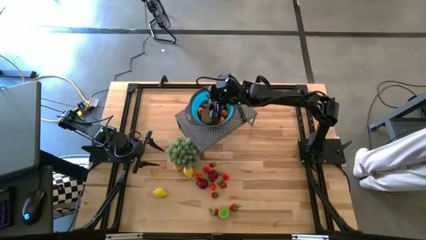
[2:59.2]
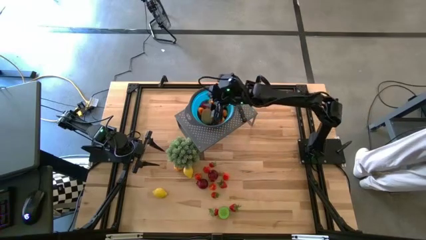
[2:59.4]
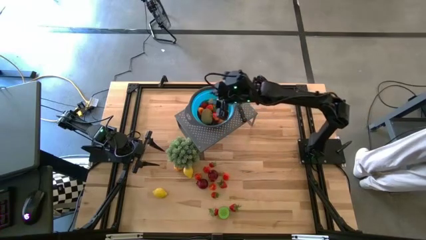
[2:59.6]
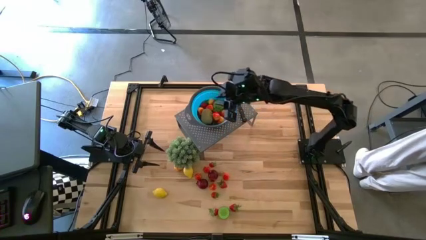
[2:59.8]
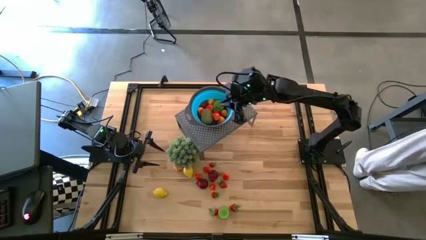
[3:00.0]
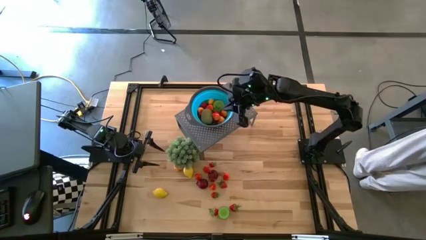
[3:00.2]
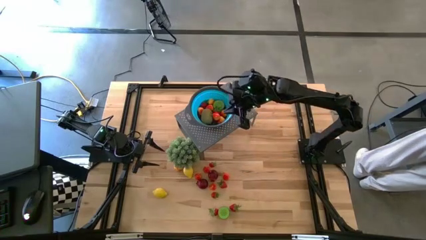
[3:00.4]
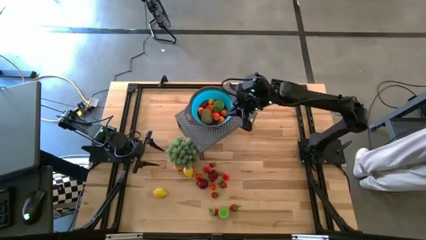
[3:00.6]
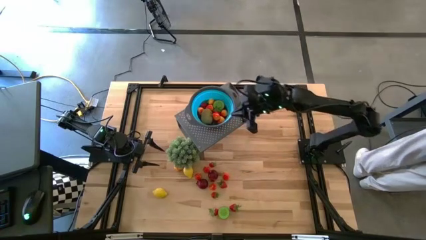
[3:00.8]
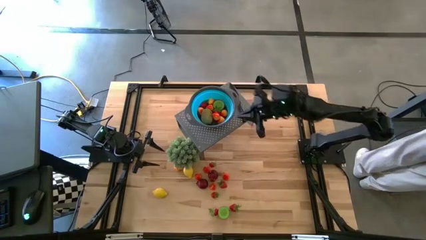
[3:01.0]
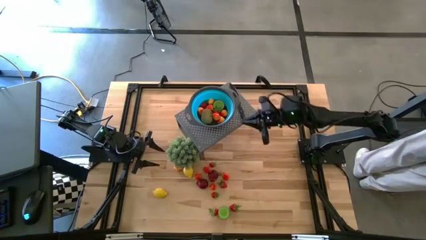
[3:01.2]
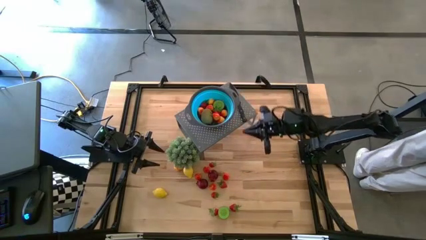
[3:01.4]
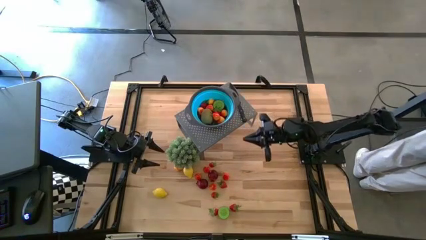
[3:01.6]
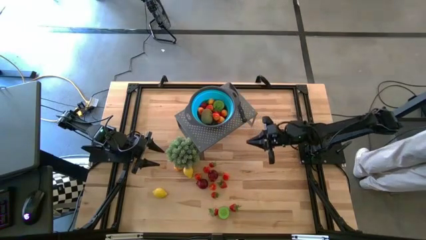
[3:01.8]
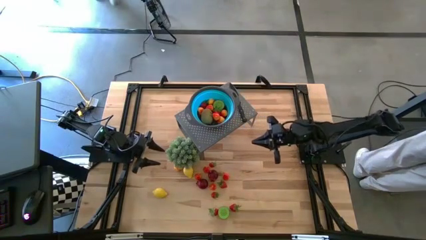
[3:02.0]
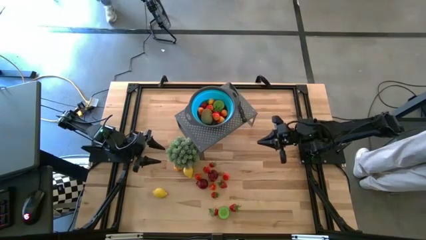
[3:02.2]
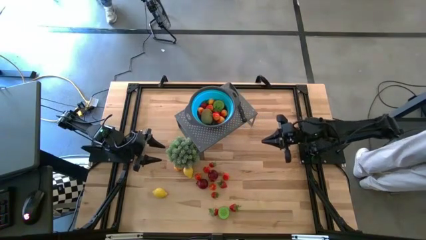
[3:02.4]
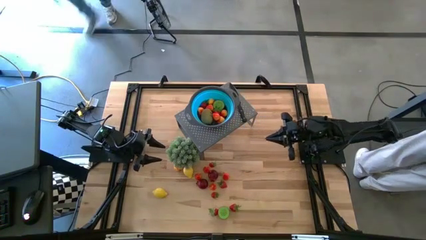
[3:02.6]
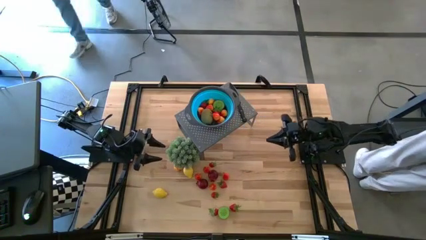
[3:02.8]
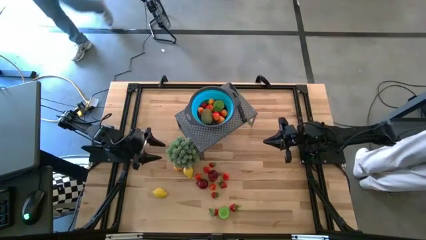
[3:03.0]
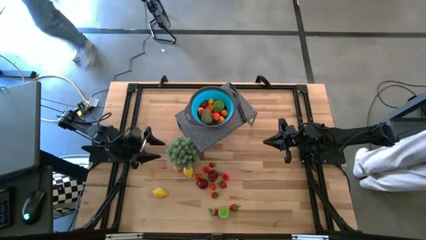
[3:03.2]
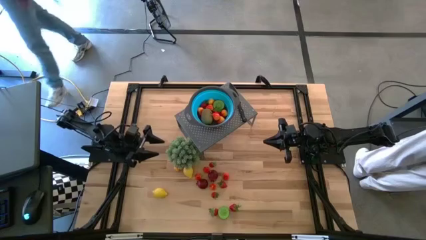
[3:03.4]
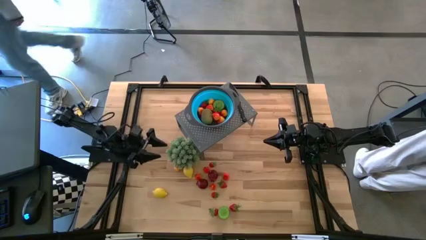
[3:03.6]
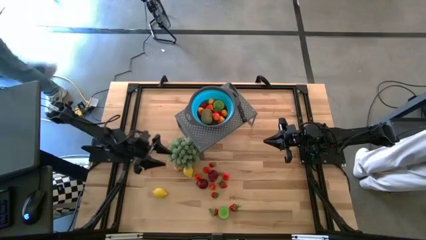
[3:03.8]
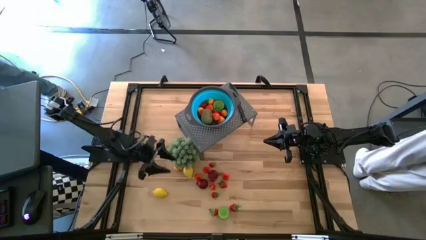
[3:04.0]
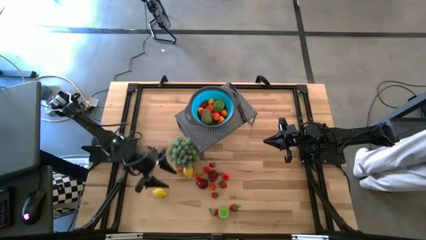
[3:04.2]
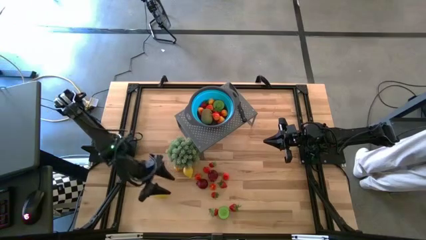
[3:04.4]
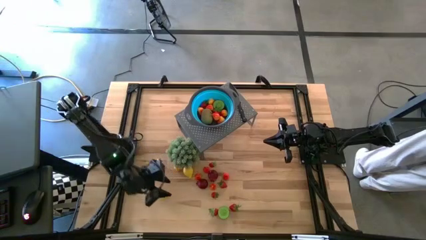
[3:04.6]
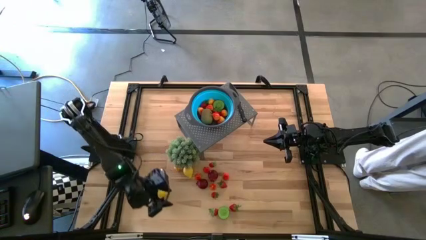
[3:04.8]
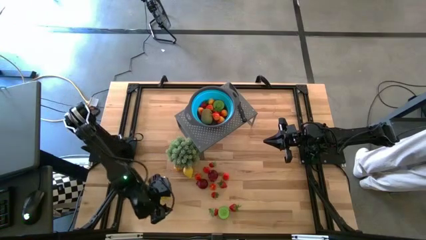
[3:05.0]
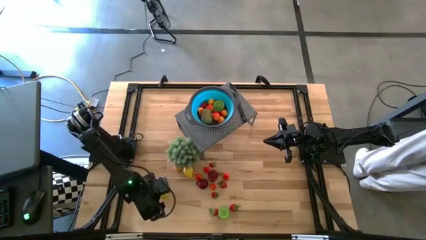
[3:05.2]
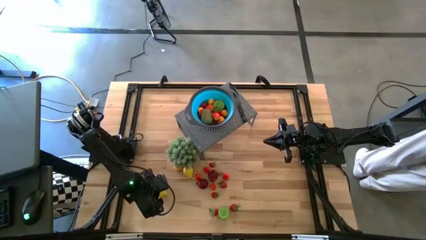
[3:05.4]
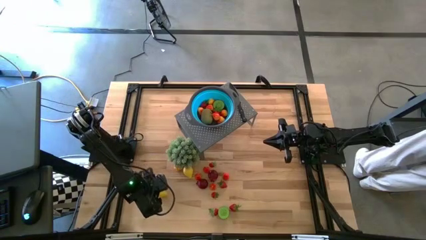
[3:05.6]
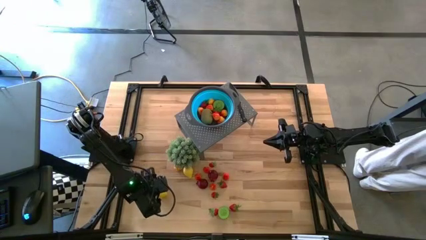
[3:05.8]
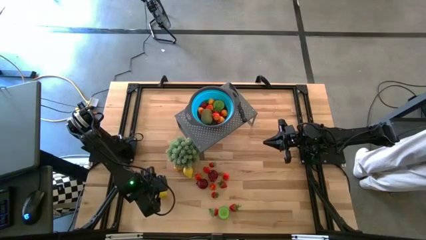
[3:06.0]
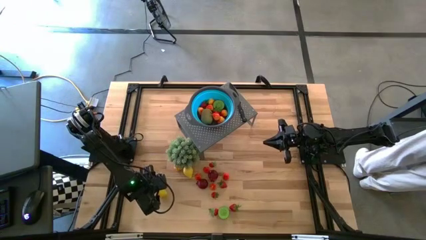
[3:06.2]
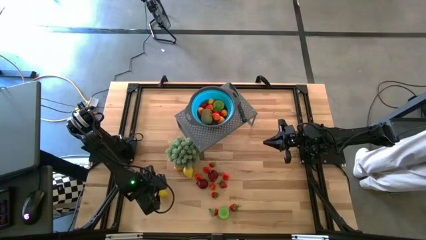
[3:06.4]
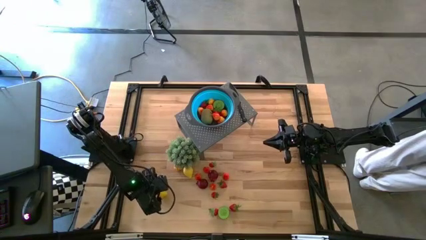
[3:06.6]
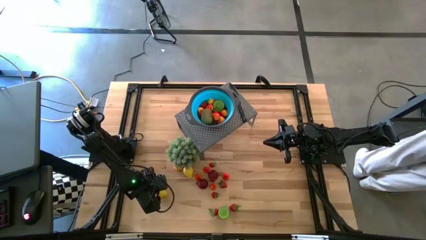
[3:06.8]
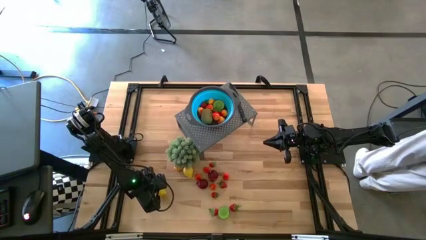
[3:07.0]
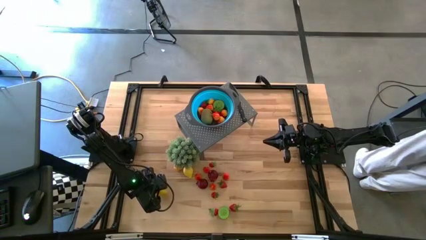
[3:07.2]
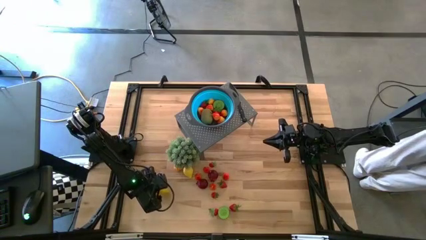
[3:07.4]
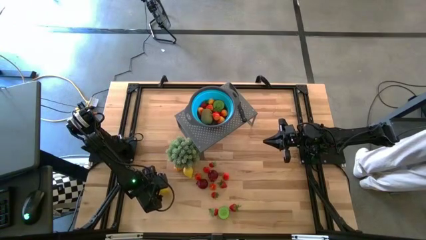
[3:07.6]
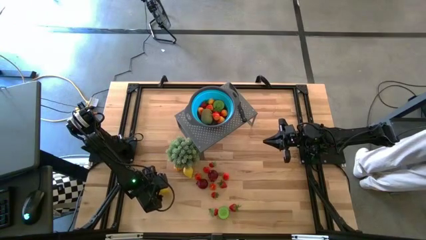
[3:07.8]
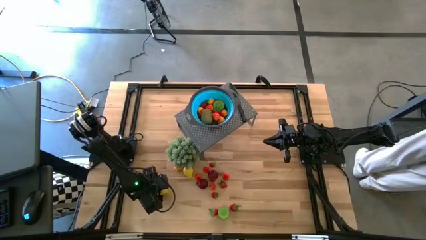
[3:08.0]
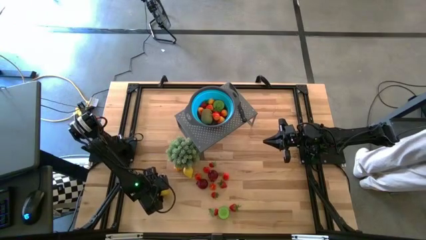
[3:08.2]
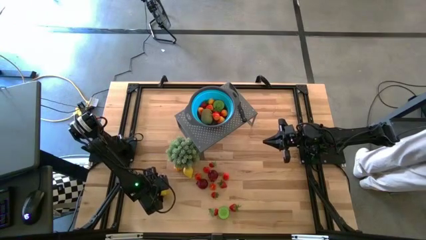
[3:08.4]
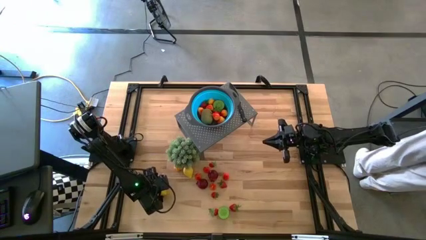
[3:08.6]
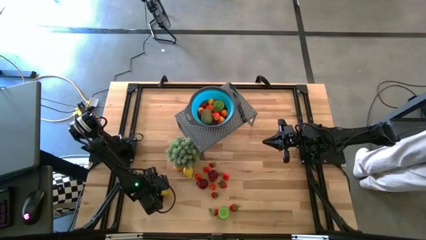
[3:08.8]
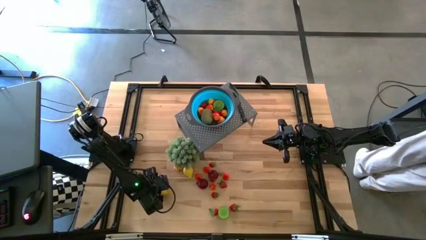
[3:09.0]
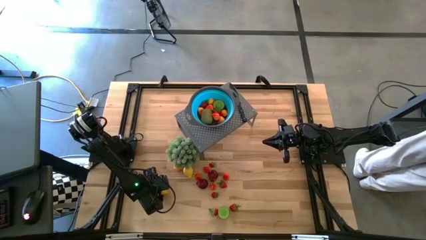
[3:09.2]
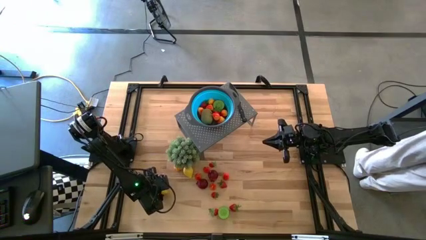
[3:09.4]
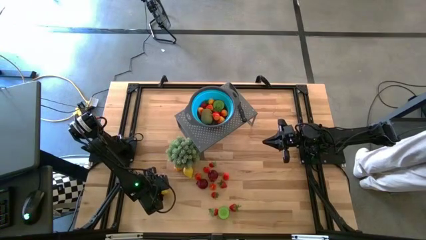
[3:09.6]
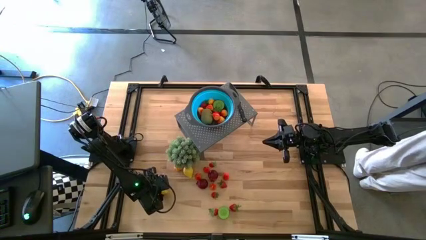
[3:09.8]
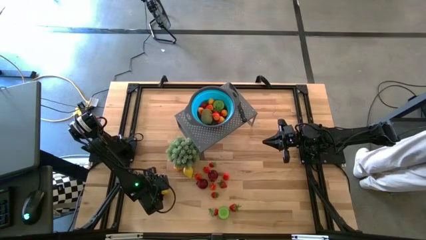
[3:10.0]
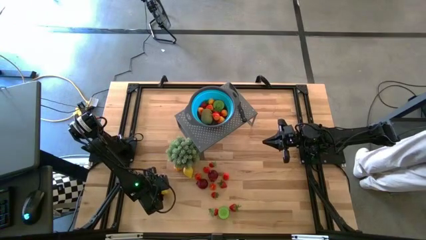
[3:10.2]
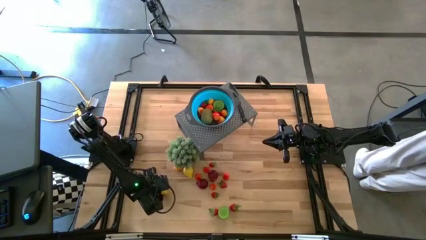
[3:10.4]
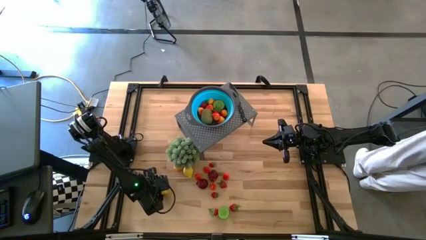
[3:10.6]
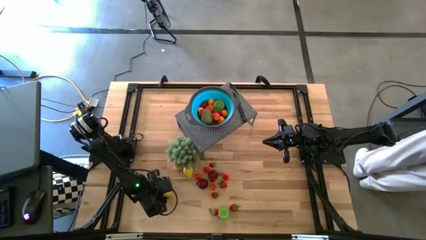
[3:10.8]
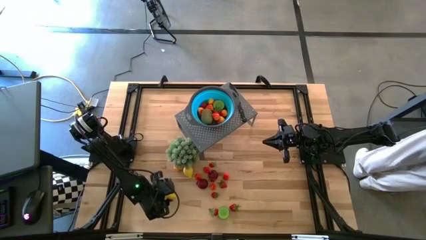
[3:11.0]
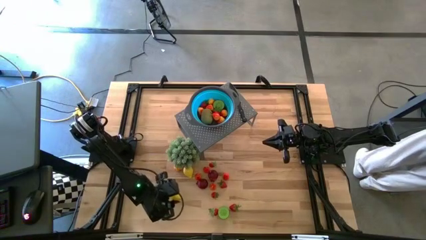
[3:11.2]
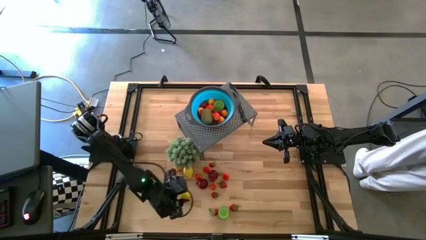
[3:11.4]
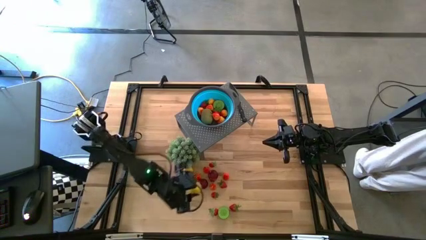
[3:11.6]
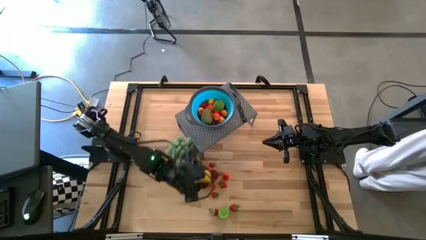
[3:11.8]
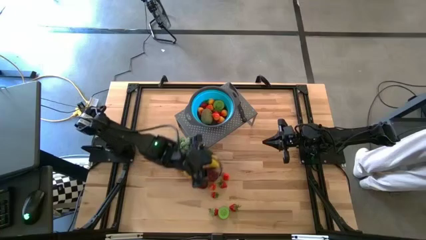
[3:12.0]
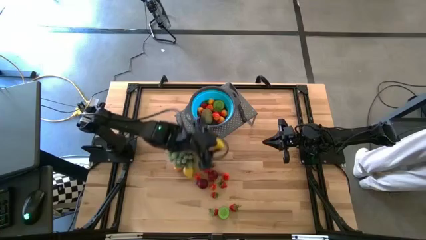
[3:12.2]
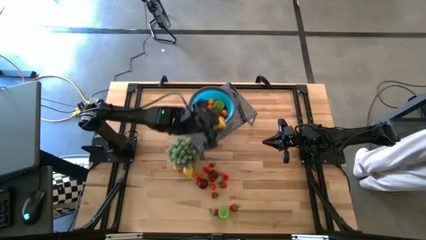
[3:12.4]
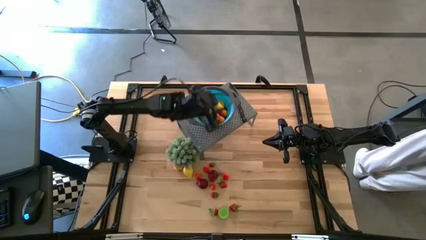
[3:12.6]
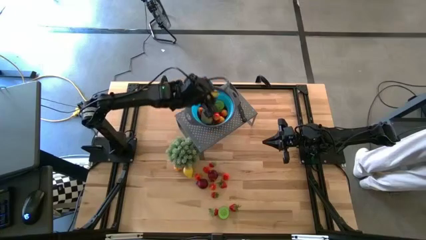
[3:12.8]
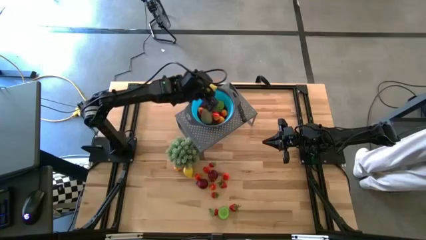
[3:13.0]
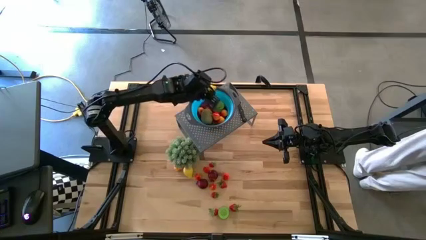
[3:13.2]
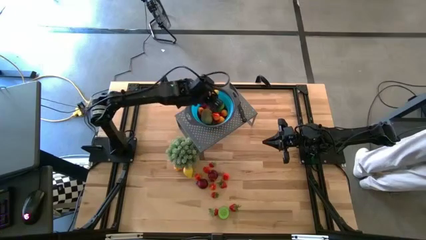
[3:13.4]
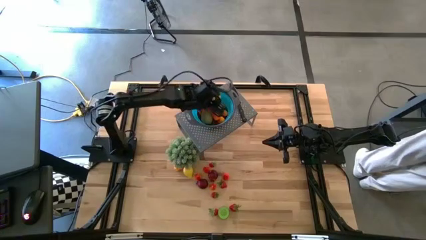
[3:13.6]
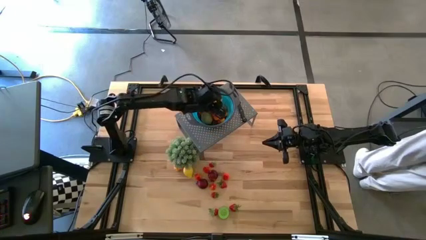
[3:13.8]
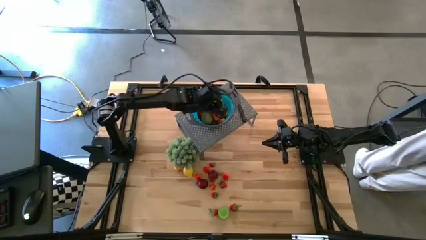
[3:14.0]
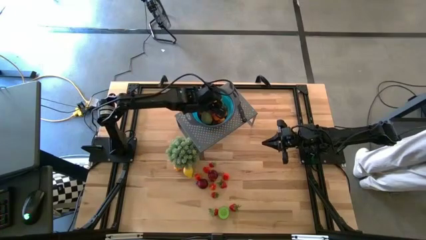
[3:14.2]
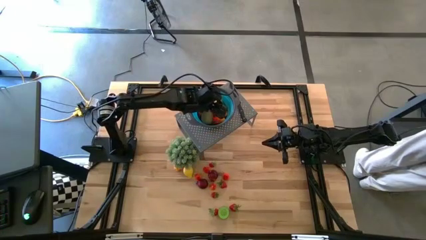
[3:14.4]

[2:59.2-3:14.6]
Task: Pick & Place Fruit
Put the lemon into the blue strainer bowl on the shelf
